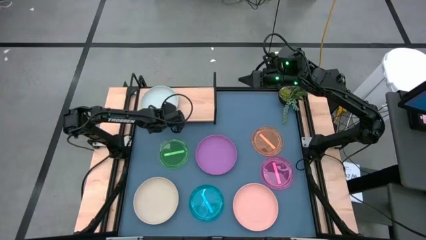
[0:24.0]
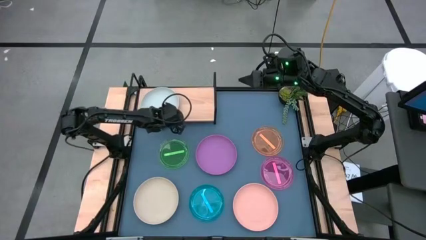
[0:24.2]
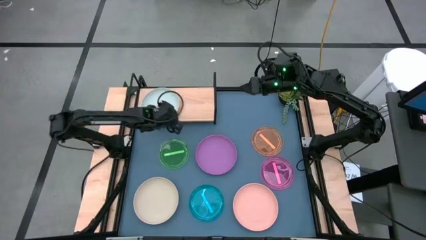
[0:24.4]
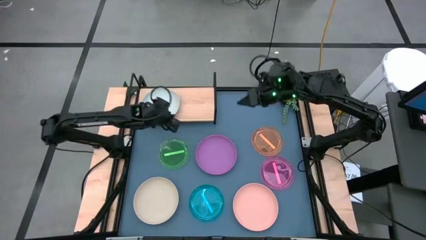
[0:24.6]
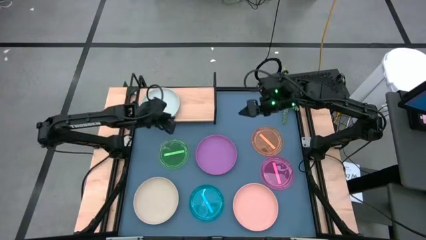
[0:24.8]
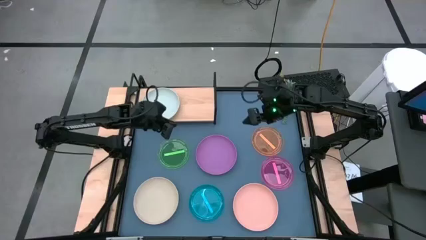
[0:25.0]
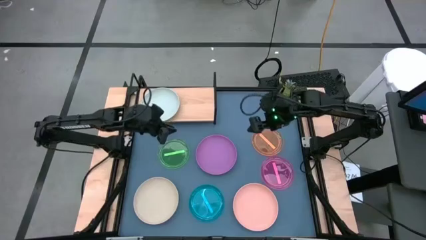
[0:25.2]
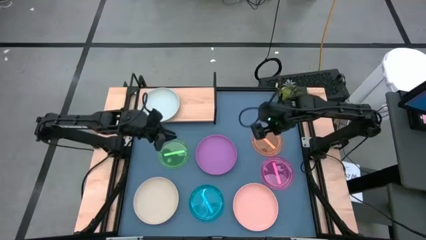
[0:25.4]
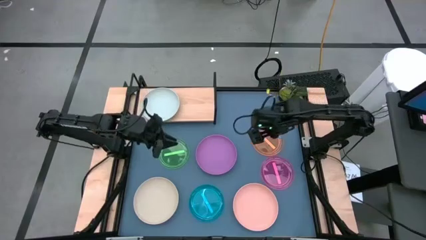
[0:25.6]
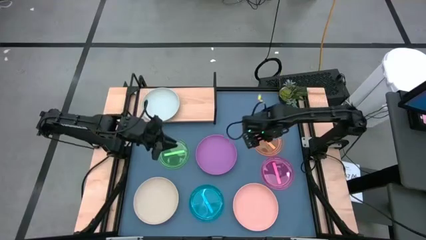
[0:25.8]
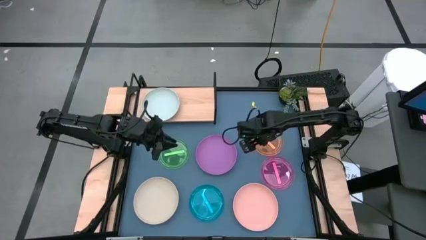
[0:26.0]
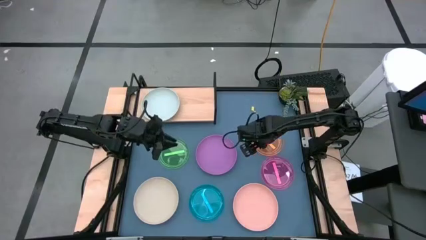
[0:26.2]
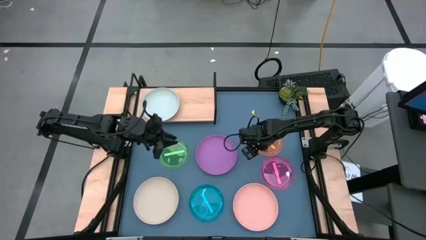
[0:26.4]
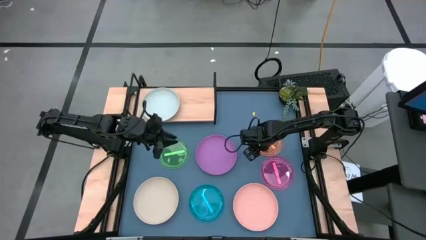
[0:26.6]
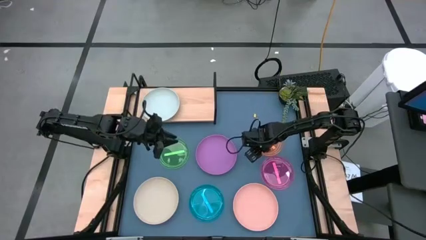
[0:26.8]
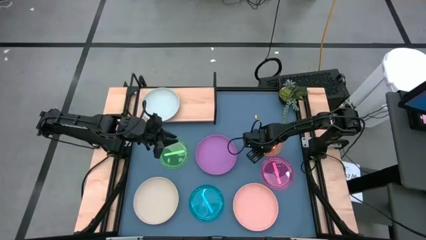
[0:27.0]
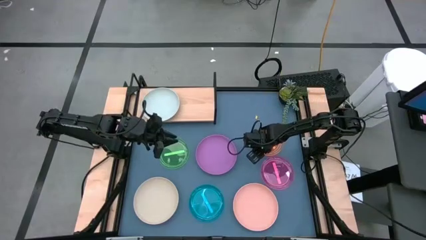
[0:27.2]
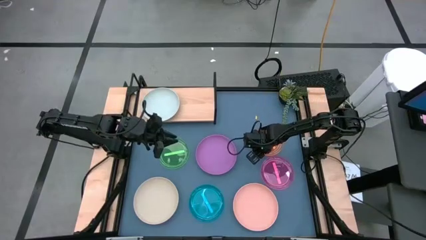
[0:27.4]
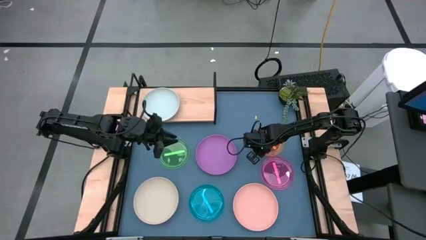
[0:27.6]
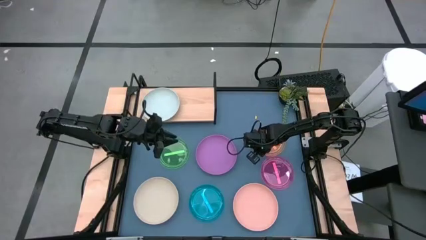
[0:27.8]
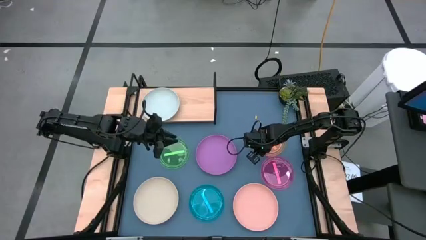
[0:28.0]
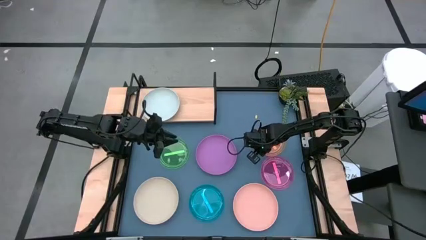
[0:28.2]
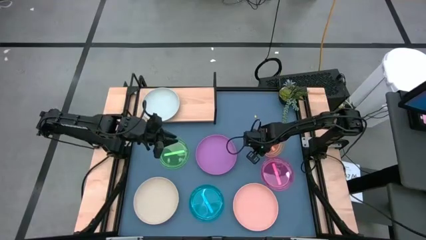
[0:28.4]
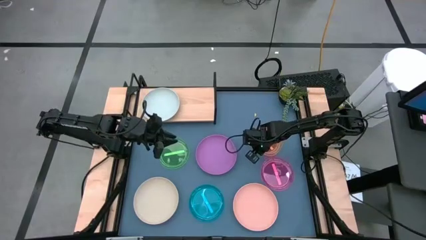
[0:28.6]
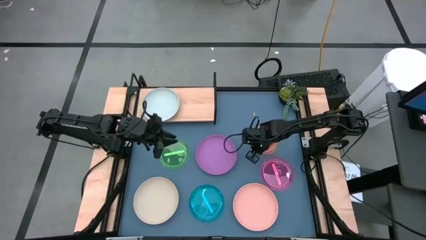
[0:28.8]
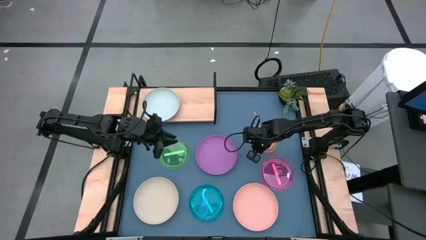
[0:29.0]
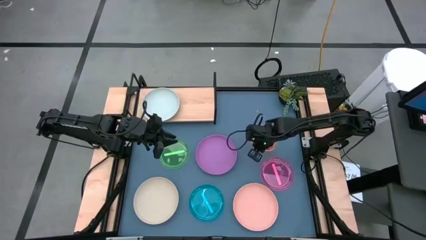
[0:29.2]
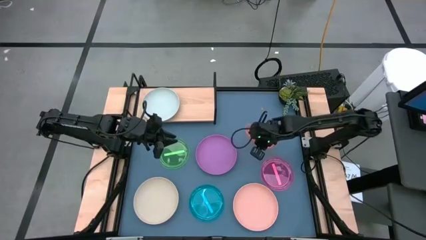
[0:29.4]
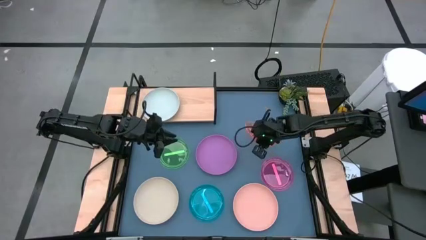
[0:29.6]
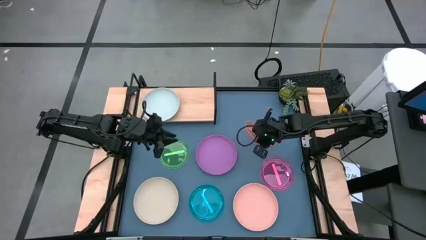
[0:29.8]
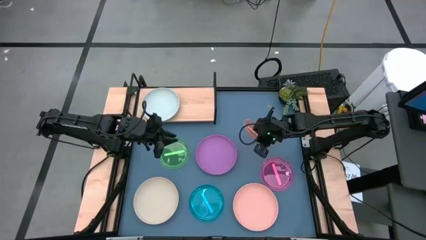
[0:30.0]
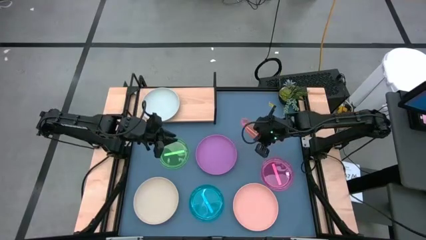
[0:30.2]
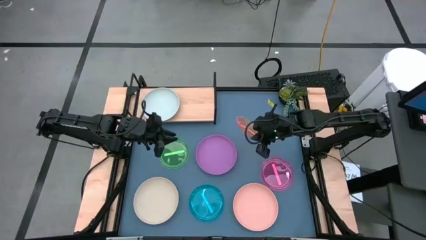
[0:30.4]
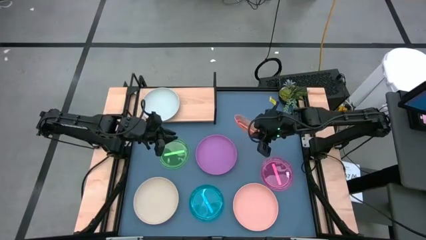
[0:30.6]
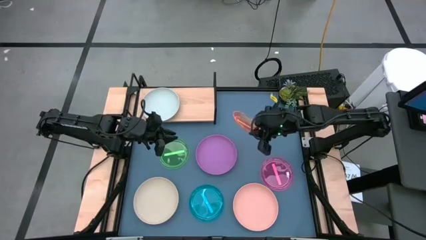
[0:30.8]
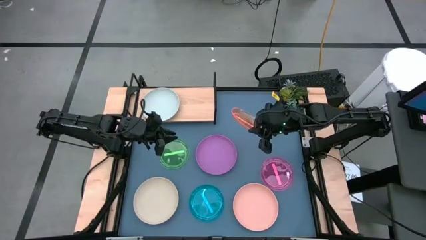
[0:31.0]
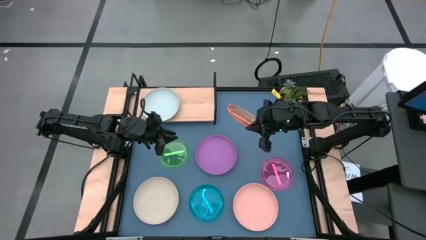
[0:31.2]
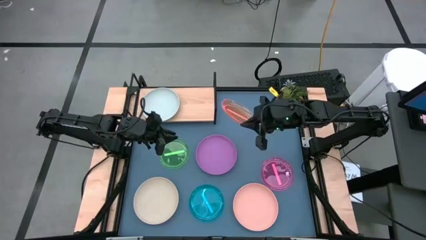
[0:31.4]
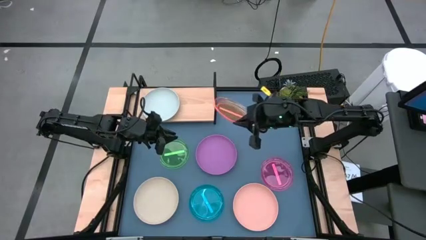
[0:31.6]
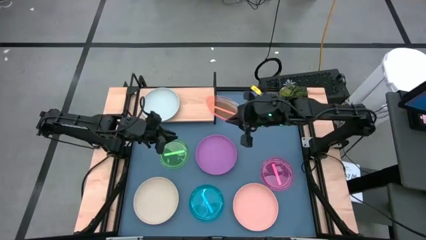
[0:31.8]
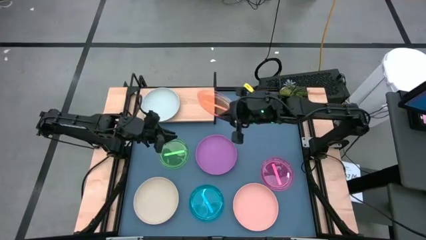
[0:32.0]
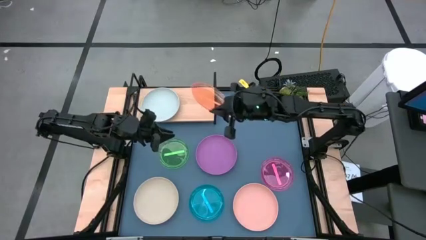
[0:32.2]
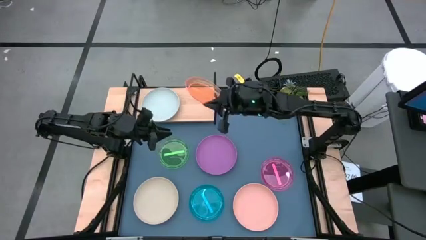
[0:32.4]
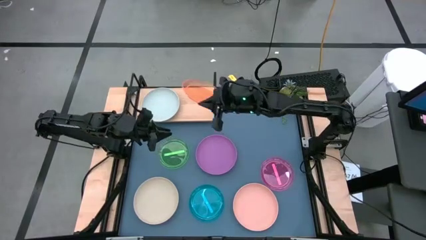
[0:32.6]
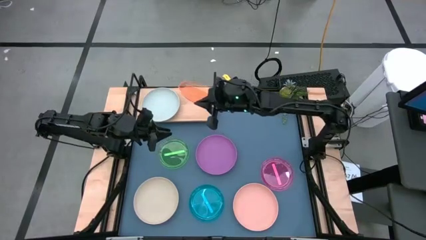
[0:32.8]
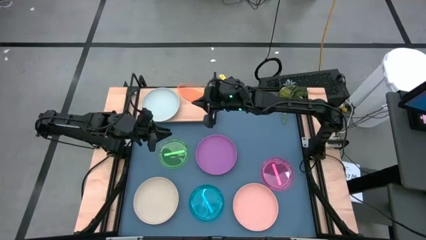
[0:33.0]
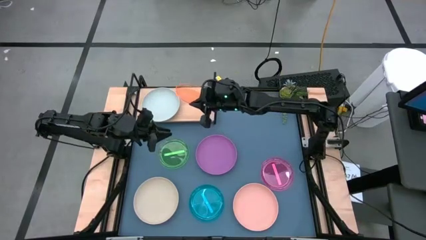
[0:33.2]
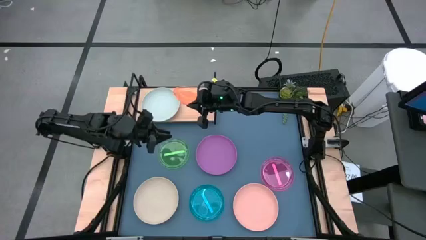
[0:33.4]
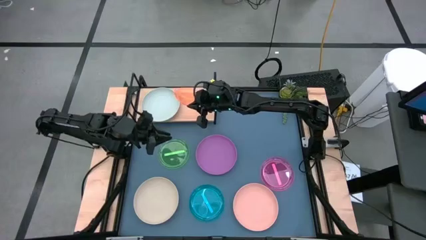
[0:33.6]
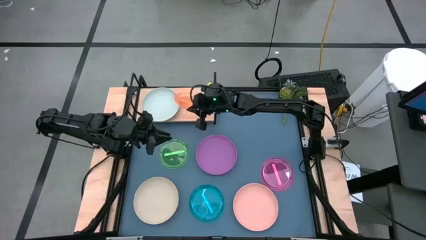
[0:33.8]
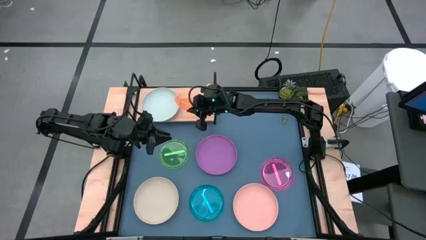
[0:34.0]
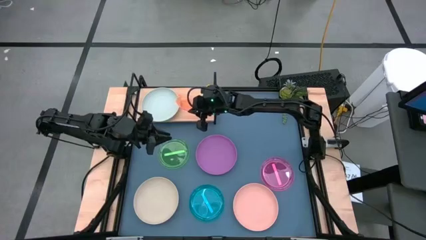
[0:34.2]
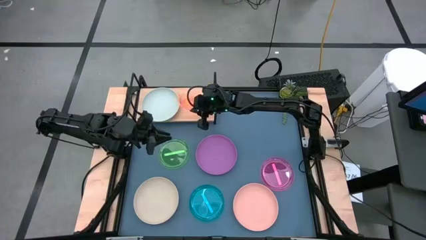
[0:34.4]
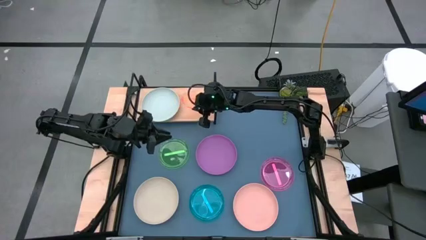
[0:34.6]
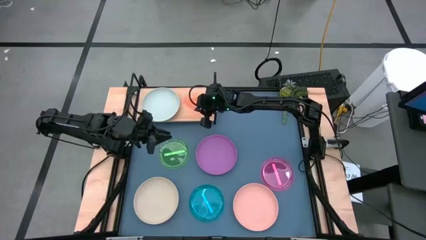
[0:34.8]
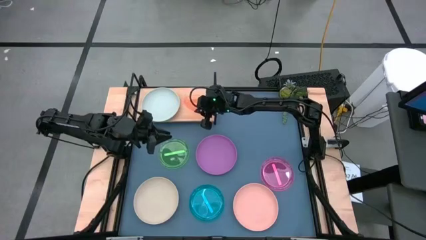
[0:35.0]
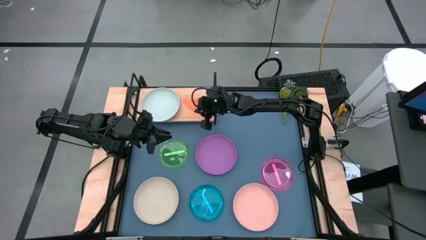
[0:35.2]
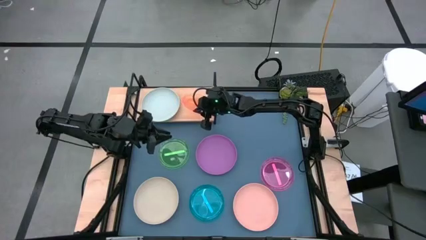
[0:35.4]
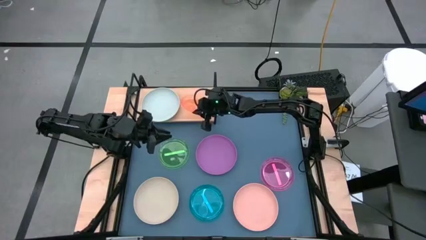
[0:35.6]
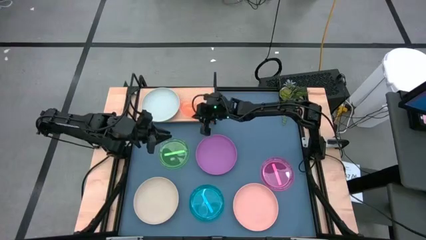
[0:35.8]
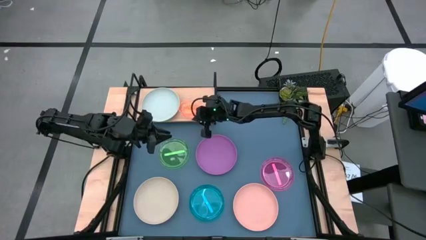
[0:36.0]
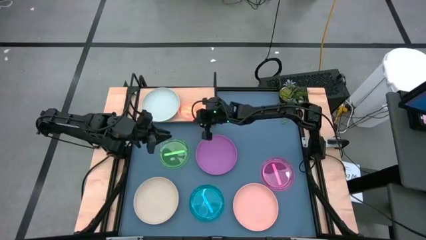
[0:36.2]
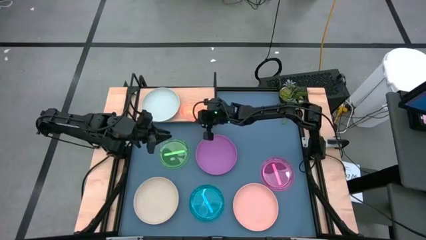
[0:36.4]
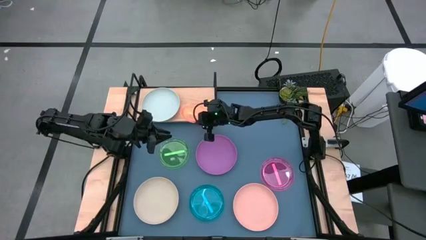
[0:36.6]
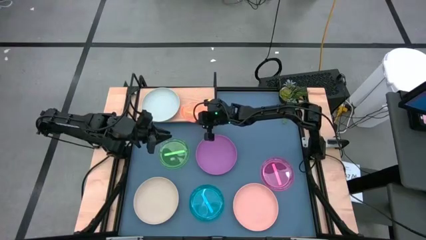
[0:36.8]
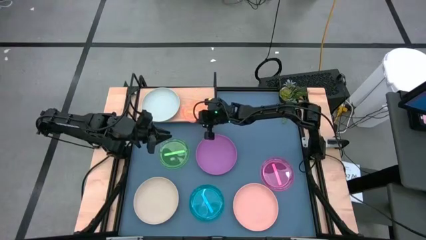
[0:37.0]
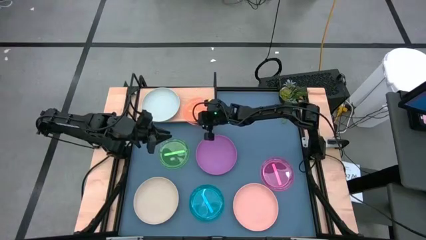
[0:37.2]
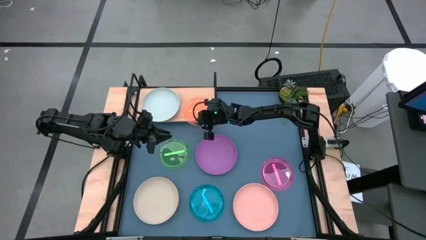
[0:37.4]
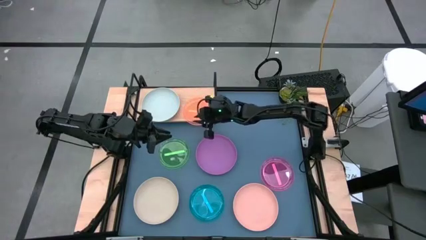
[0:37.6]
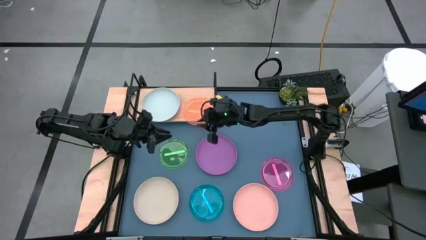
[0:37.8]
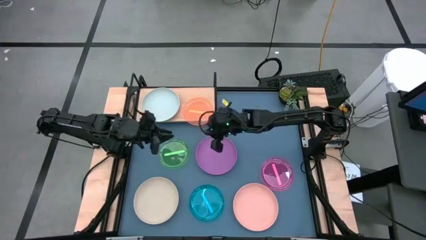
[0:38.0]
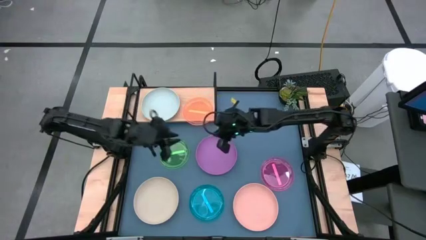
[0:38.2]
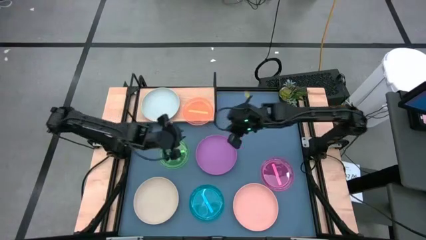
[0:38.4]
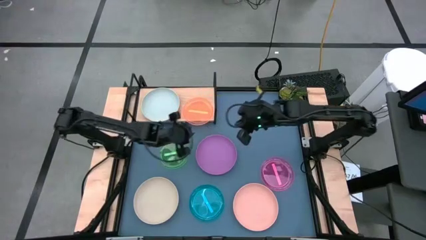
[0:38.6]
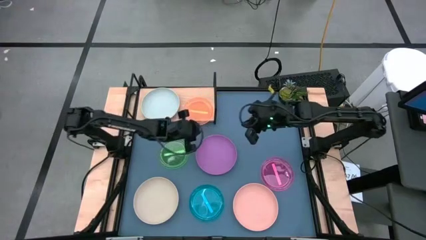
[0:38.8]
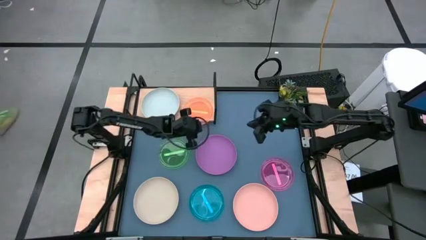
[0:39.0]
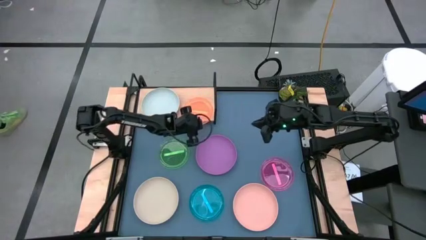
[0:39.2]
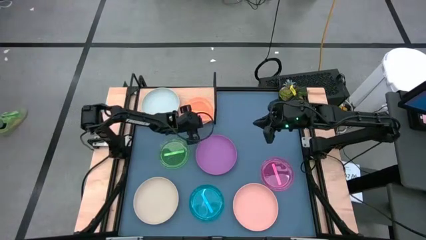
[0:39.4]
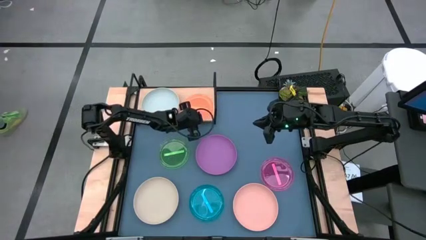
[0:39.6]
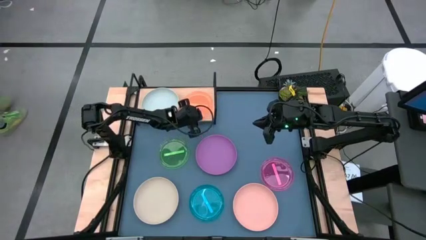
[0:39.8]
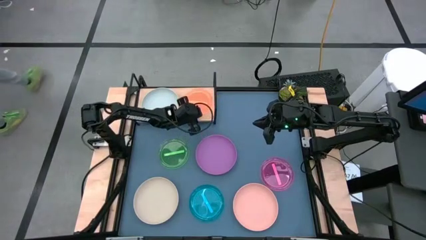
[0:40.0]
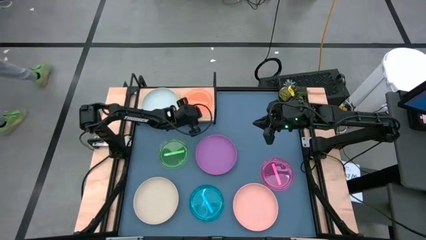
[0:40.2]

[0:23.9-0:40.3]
Task: Place and stack plates onto a shelf
Put the orange plate on the shelf

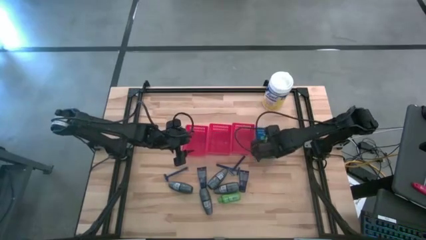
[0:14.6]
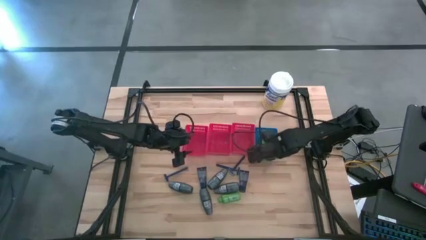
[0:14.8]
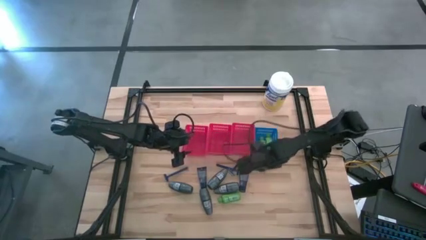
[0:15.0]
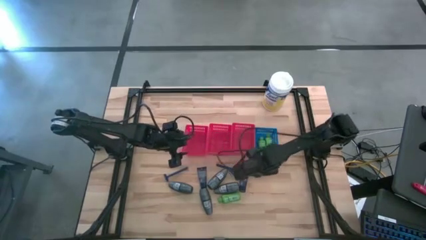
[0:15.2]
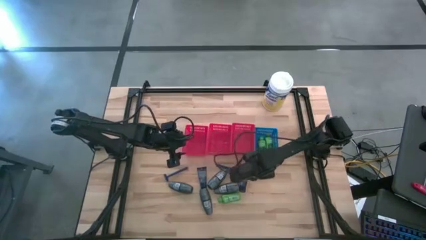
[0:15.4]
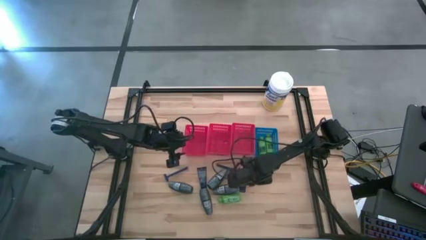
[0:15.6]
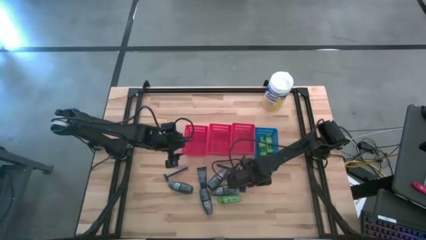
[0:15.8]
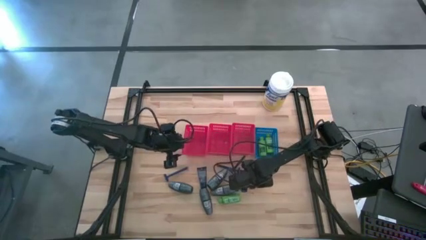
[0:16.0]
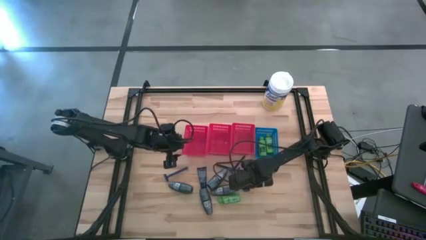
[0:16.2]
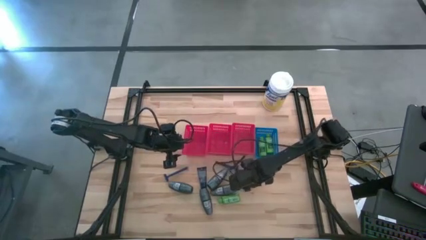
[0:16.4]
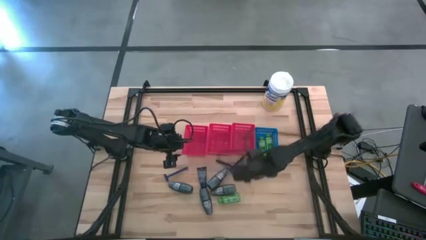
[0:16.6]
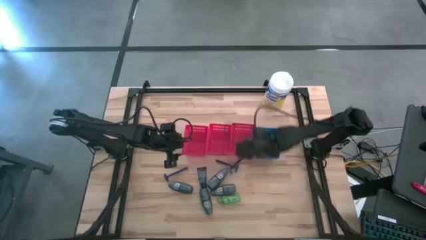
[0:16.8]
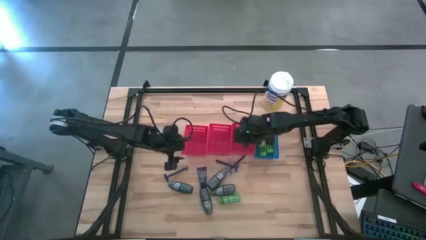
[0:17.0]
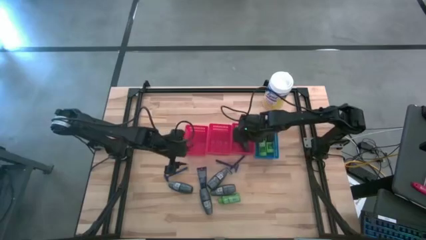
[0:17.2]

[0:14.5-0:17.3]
Task: Pick & Place Travel size toiletries
Put the shave cream into the right red bin
